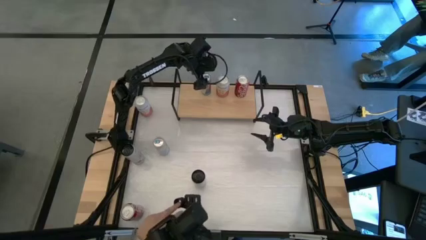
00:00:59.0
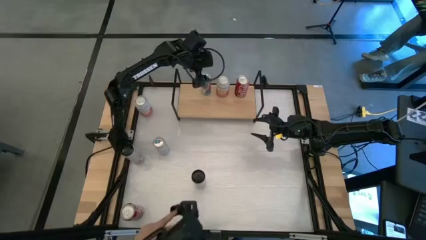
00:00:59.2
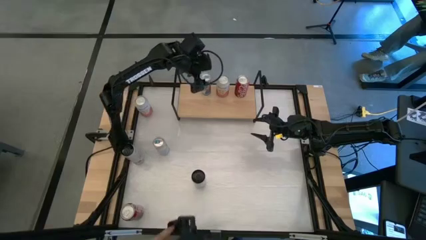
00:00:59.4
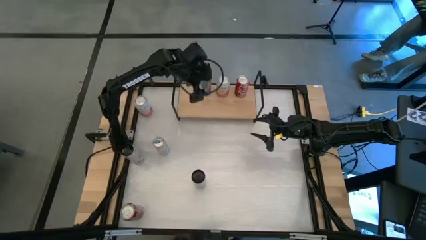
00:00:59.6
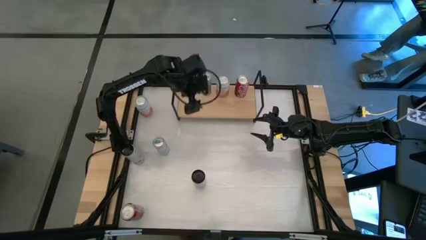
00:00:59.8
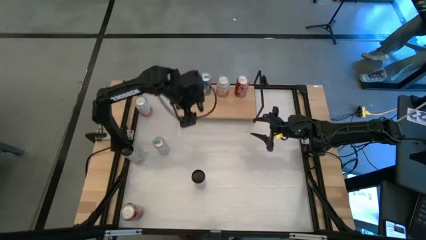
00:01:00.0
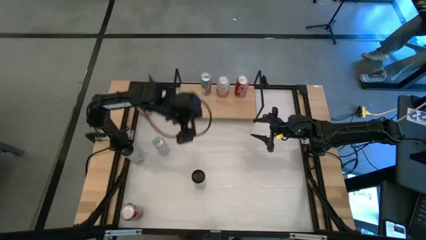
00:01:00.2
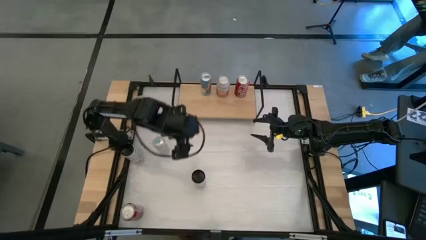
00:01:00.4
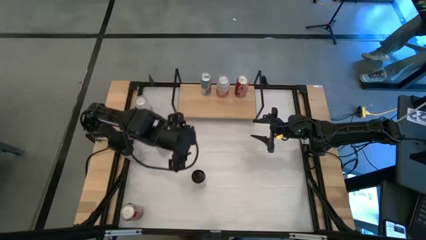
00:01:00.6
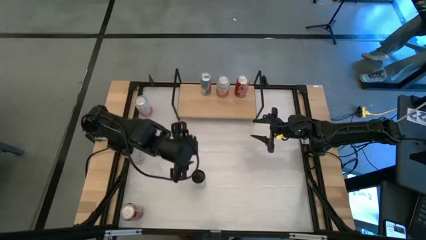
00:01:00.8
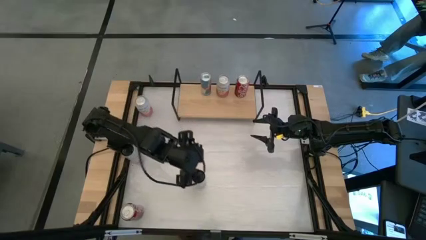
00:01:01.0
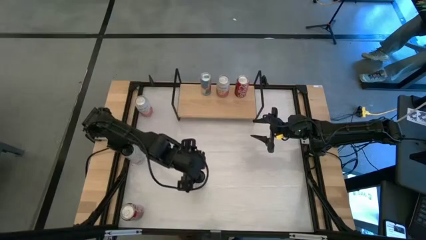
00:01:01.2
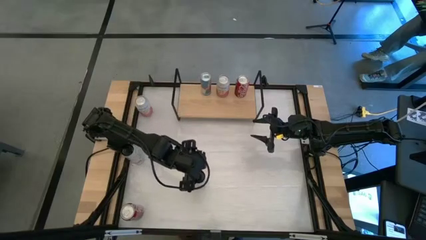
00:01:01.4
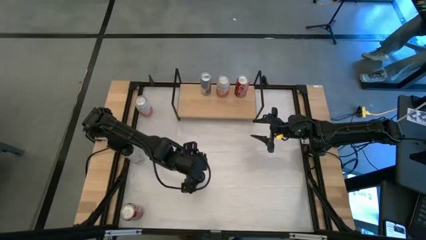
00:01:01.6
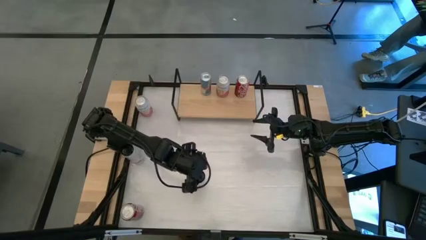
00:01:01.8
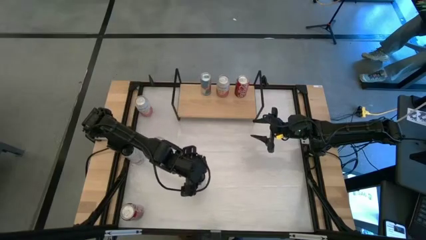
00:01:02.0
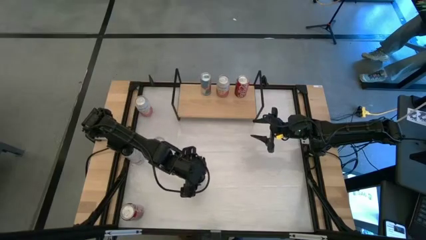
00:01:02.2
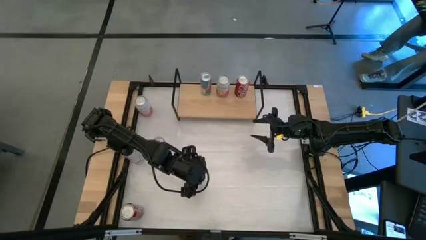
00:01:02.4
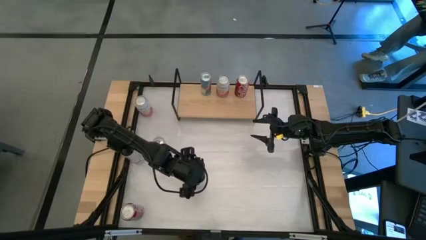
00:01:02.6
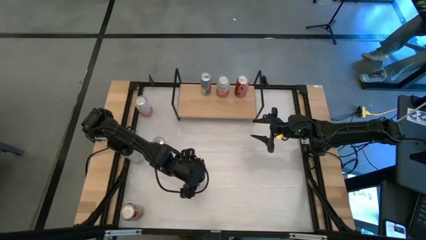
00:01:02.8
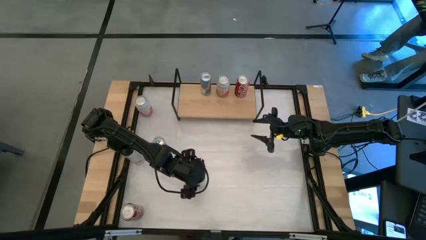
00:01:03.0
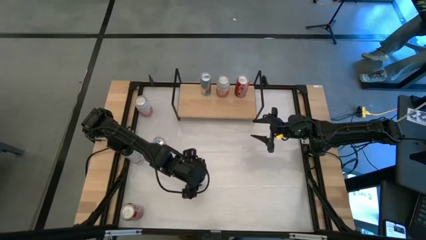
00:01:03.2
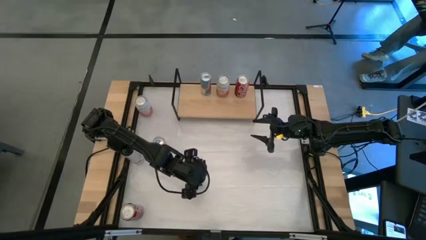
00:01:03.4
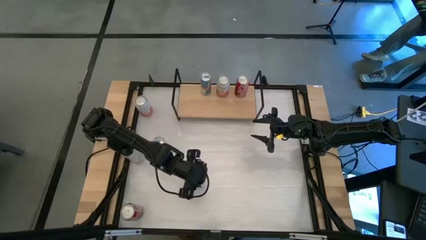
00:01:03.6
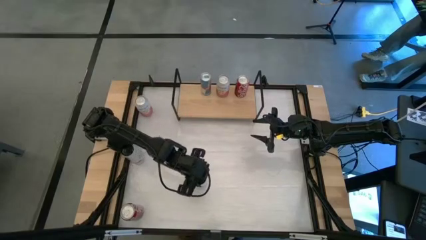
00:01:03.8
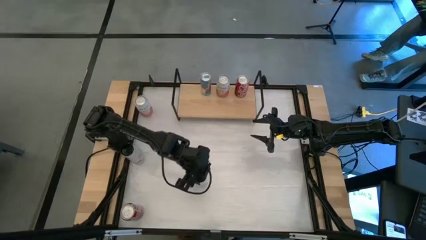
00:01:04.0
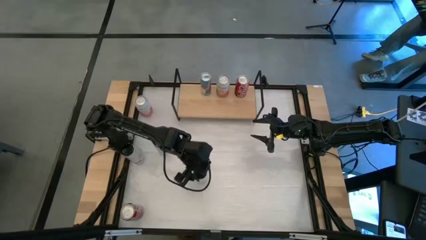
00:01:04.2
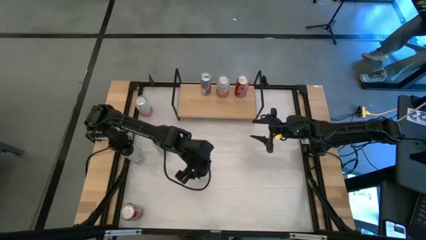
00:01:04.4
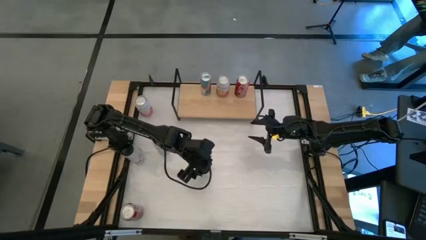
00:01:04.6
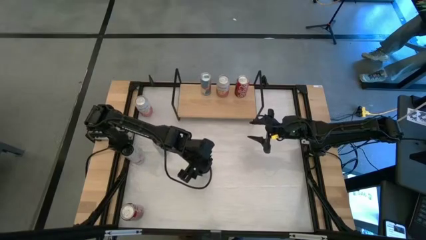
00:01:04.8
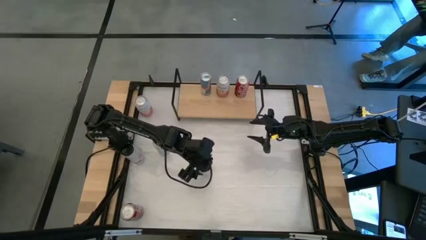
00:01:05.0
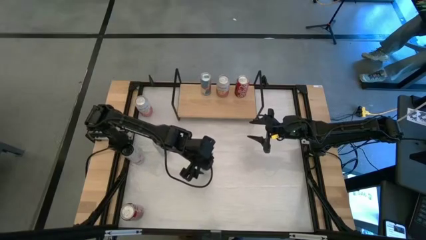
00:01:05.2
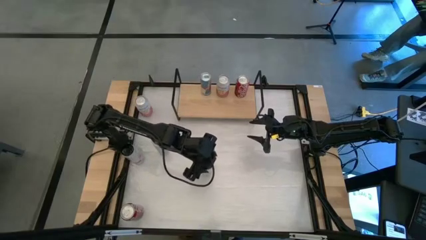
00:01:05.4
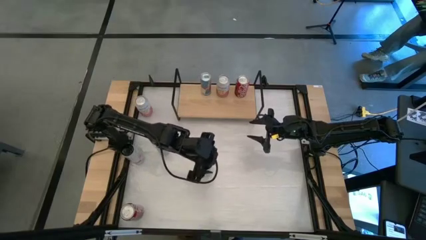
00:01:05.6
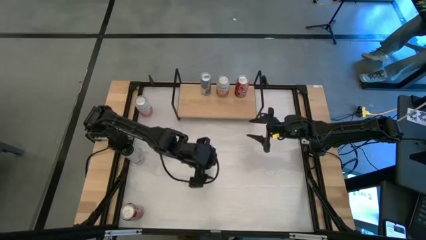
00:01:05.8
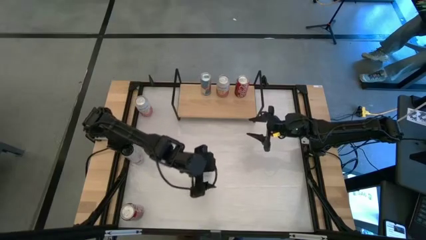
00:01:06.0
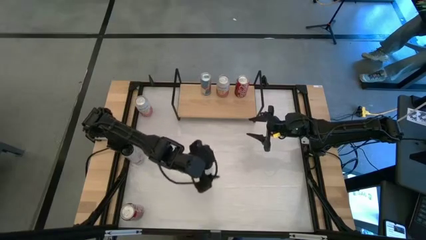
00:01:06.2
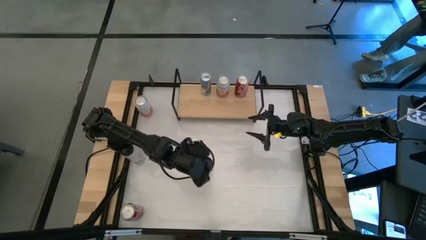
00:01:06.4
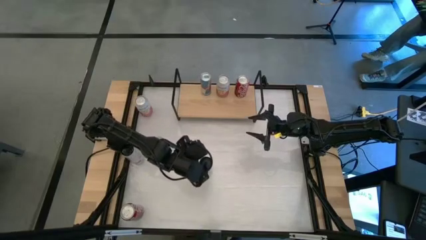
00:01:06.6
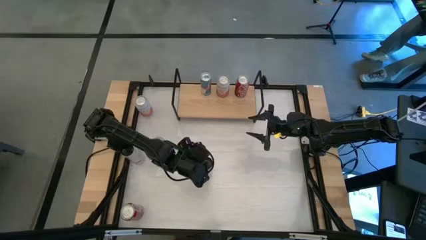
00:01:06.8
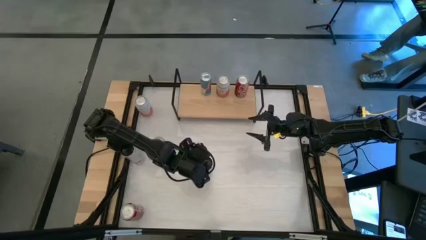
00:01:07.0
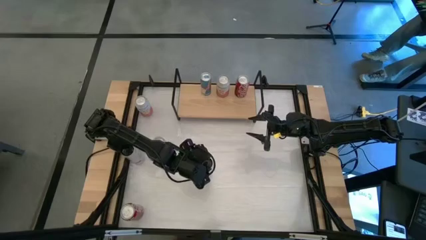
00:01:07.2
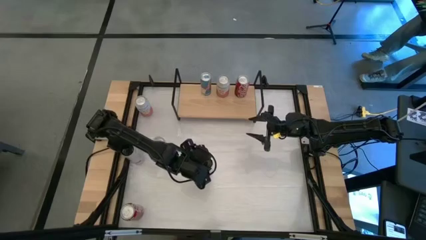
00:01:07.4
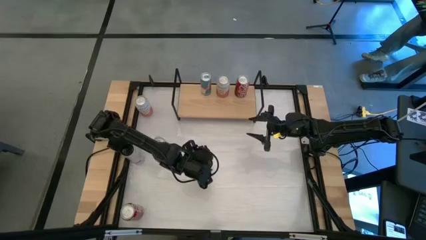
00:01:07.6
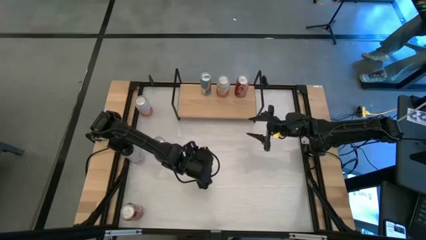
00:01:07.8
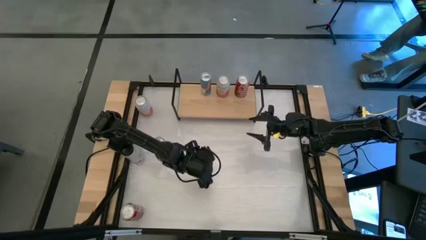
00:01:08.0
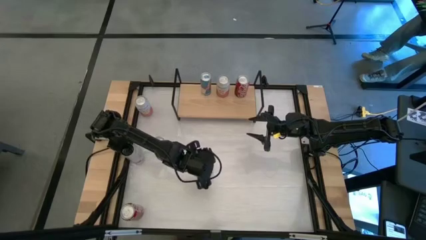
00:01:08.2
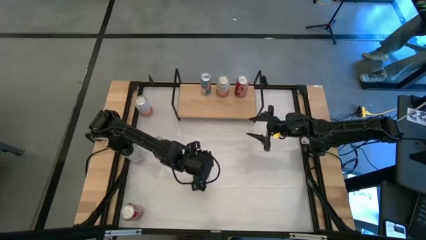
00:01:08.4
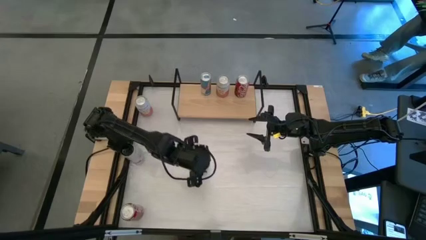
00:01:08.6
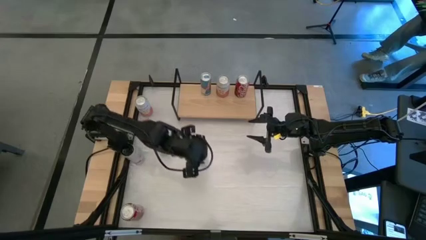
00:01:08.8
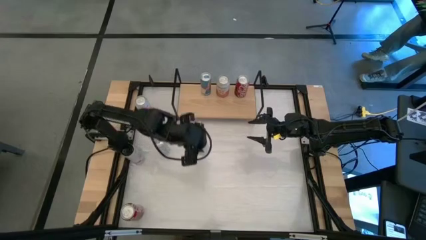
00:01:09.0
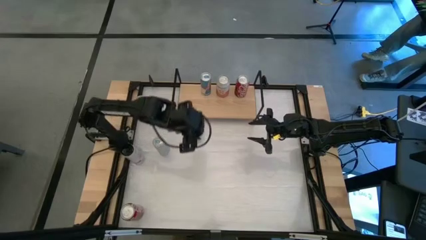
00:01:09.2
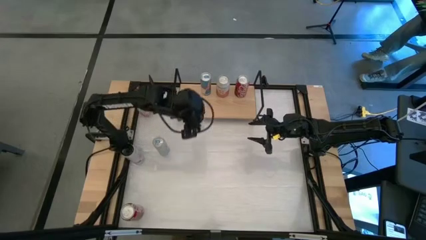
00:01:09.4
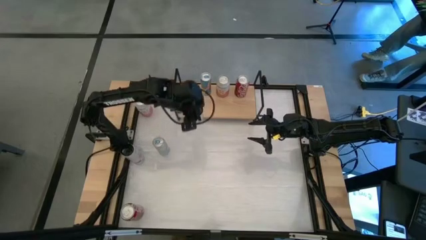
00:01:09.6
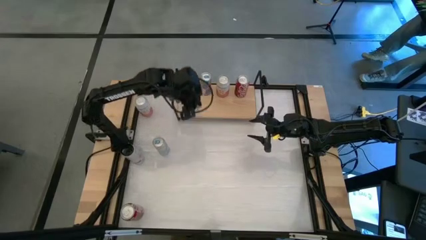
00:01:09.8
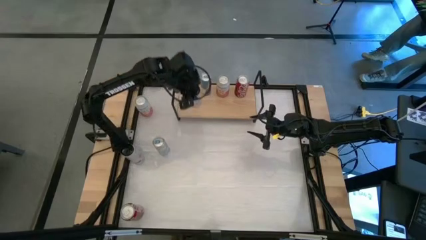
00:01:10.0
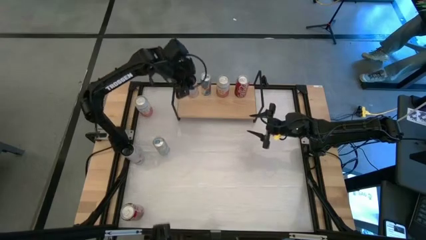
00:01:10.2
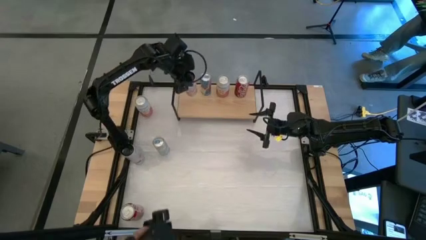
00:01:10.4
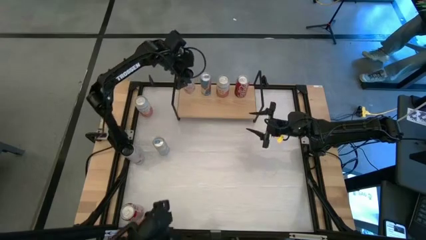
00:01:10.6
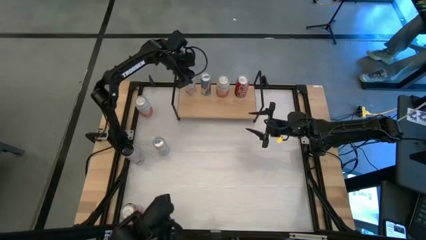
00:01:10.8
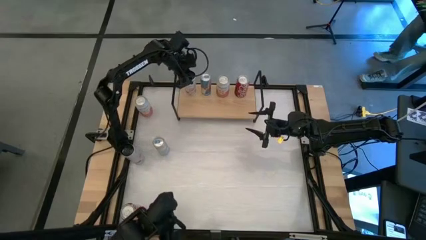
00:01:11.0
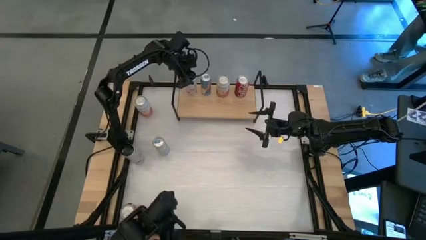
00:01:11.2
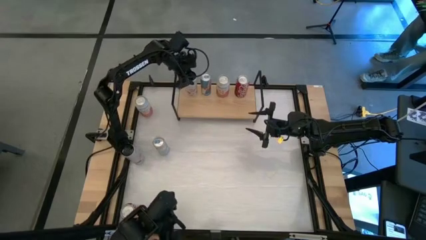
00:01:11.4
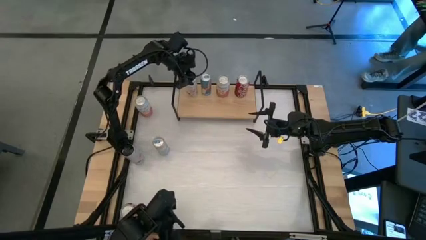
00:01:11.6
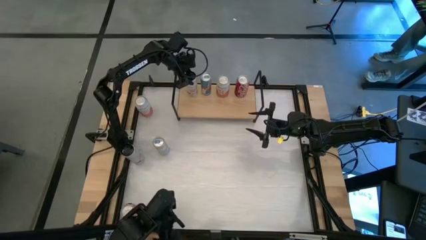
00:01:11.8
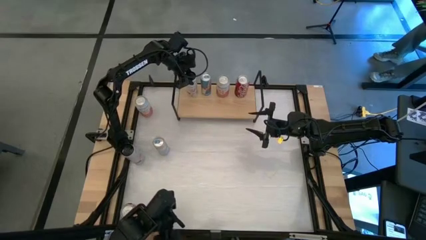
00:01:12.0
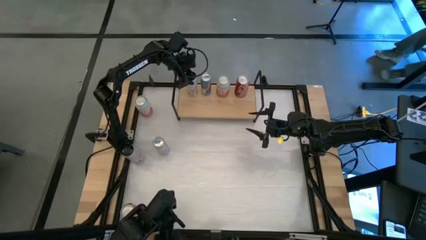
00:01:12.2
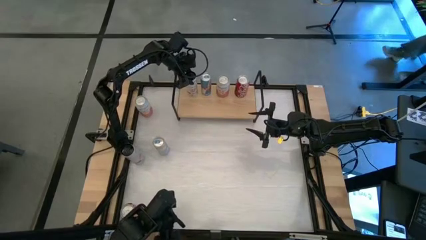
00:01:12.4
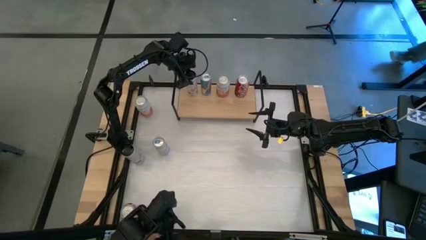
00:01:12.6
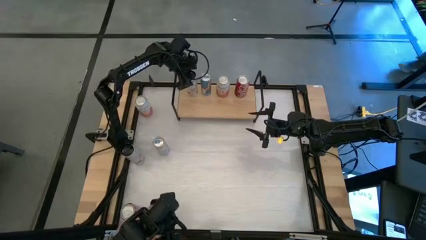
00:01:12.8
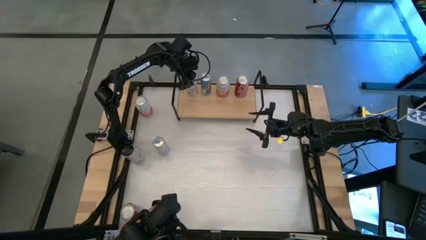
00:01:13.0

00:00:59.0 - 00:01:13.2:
Task: Place canned beverage on shelf
Put the right white pink soda can on the shelf

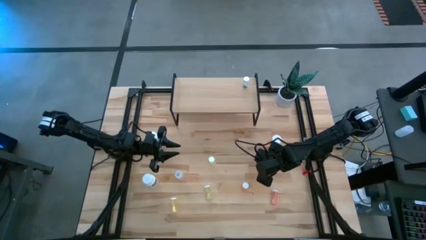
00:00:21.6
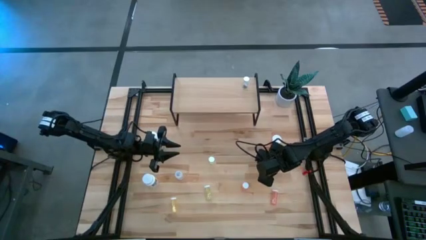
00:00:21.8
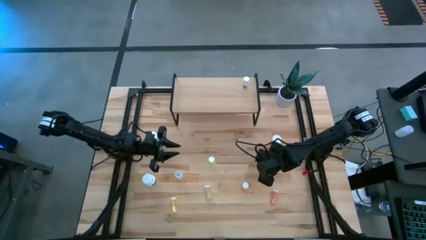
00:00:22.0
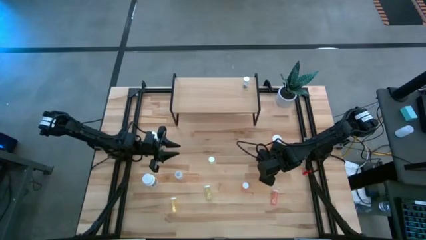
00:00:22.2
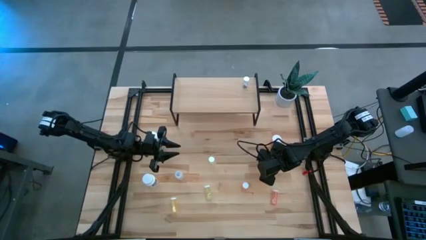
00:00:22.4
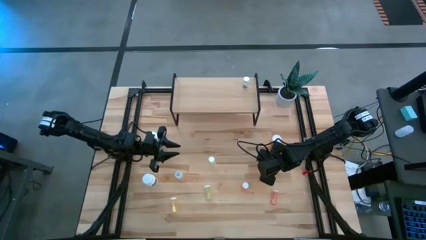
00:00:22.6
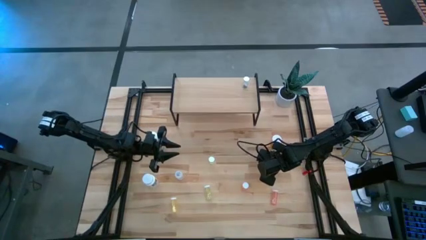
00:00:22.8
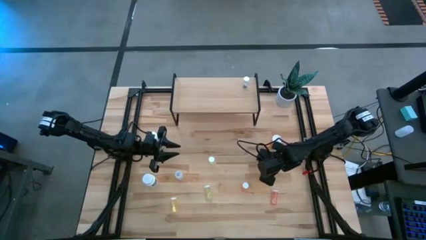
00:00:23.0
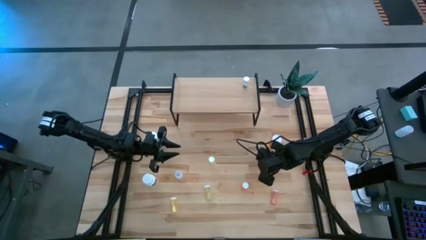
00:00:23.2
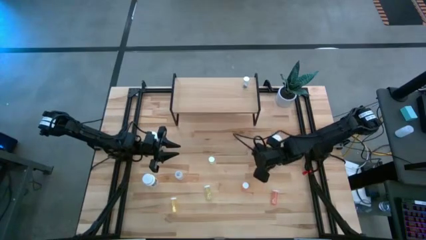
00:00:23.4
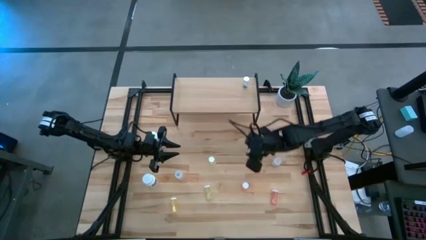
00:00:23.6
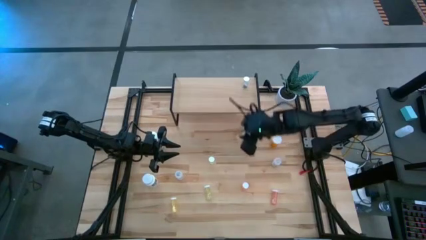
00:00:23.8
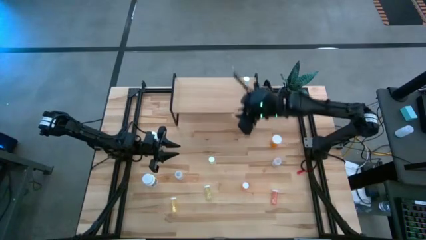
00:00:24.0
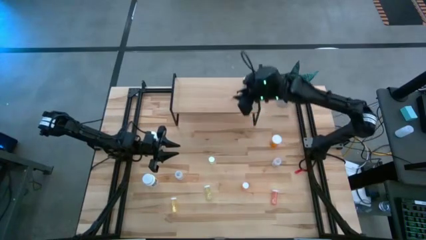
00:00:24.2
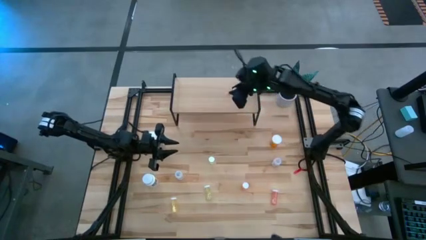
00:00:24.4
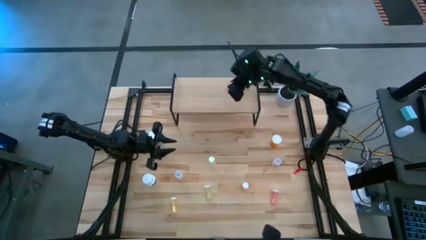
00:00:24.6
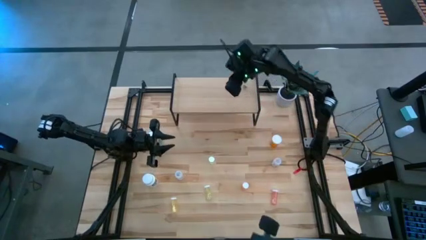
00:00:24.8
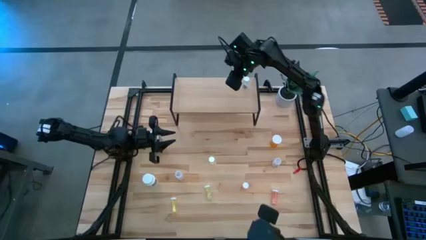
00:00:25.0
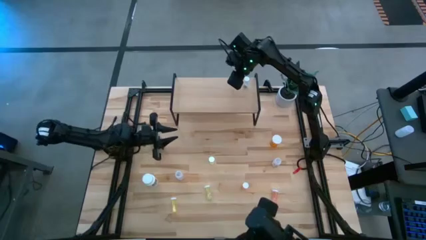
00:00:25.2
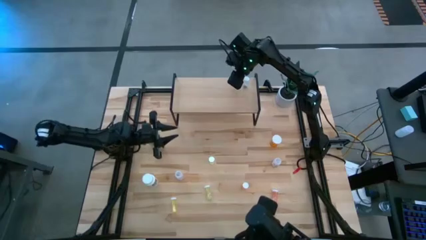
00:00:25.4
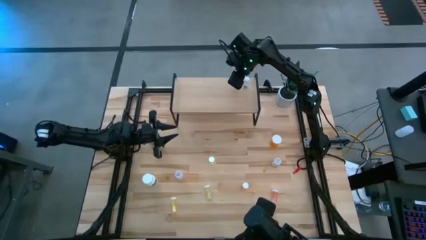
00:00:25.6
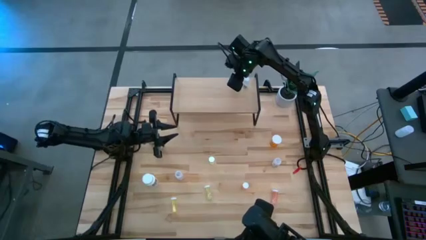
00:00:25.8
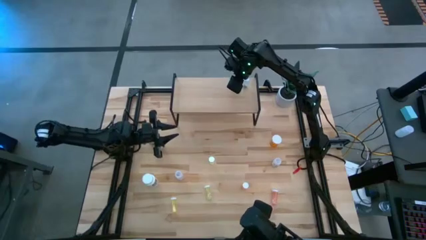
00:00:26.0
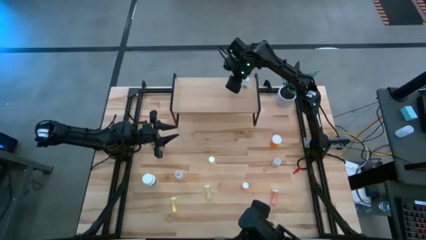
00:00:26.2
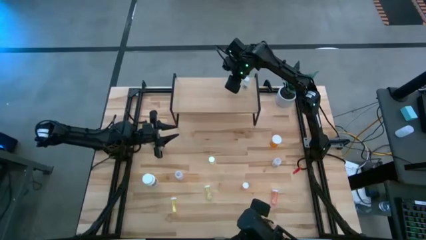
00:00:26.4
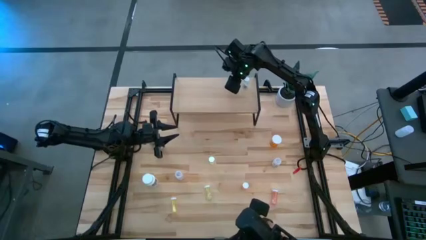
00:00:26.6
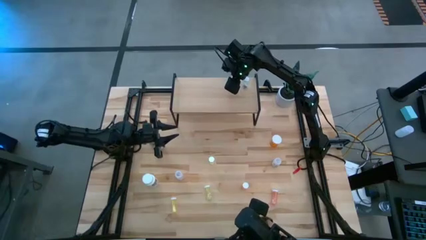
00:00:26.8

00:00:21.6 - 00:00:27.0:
Task: Pick and place medicine bottles onto shelf by color
Put the orange pill bottle on the shelf
